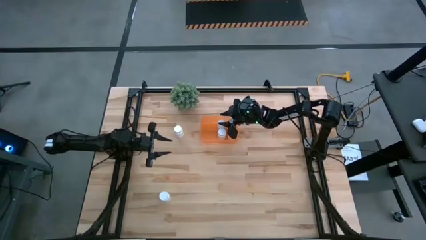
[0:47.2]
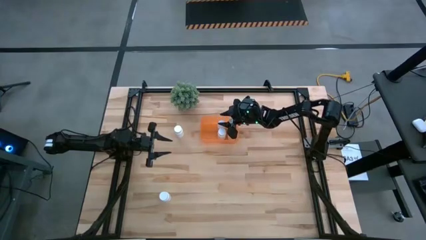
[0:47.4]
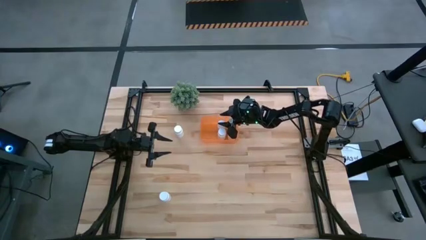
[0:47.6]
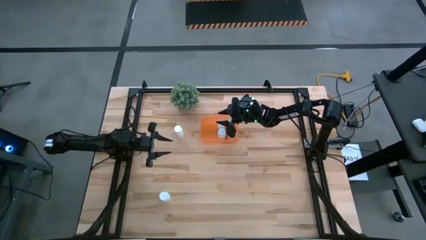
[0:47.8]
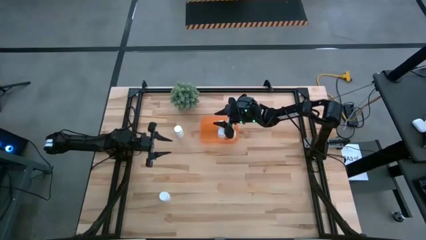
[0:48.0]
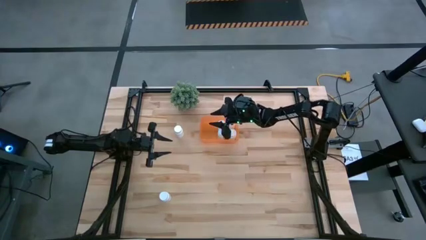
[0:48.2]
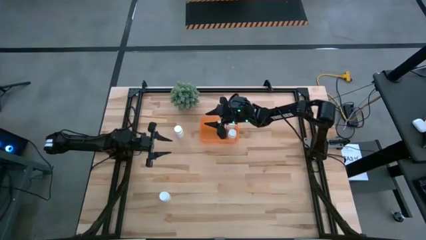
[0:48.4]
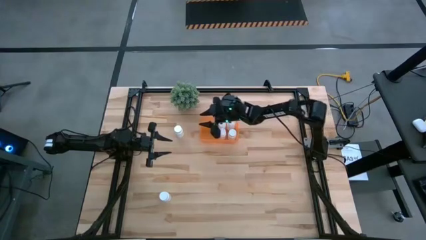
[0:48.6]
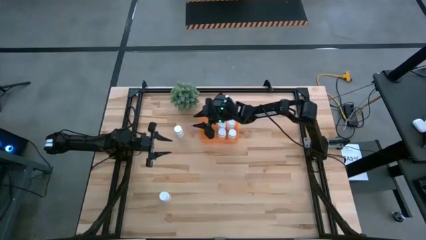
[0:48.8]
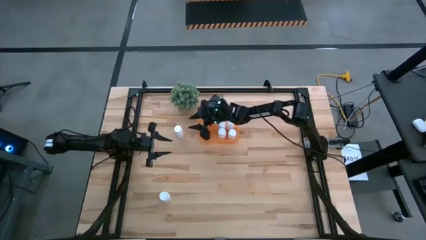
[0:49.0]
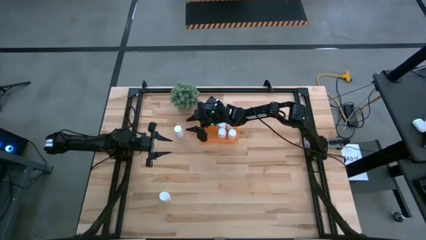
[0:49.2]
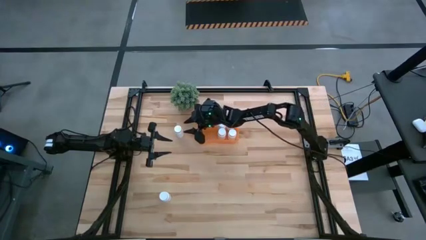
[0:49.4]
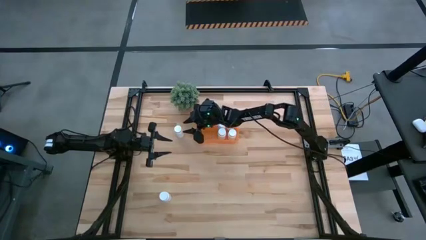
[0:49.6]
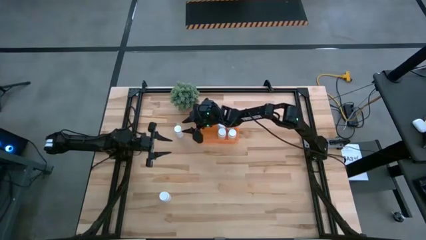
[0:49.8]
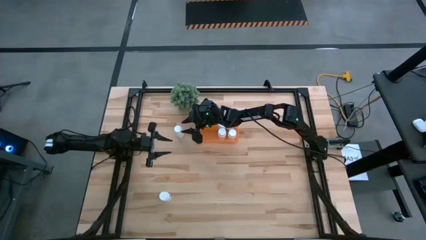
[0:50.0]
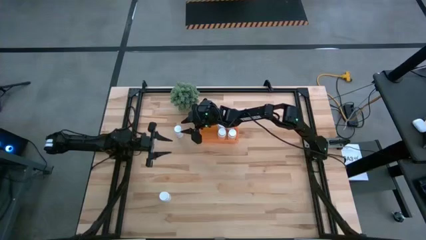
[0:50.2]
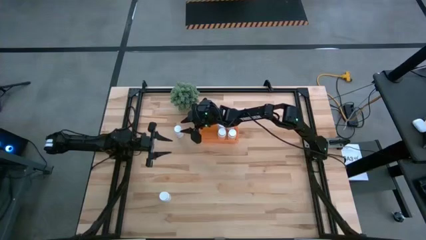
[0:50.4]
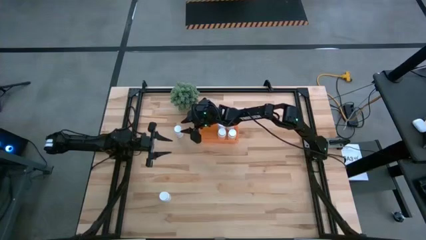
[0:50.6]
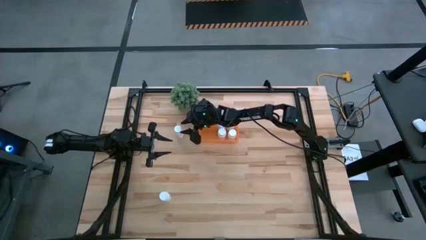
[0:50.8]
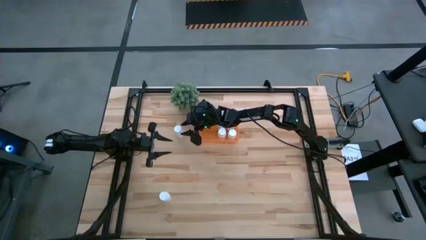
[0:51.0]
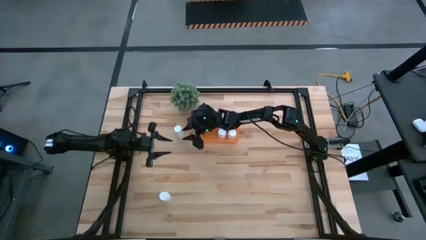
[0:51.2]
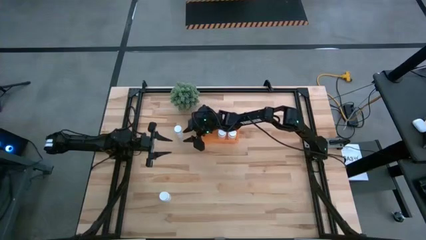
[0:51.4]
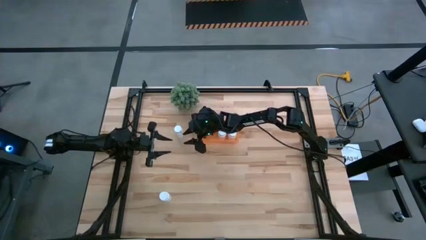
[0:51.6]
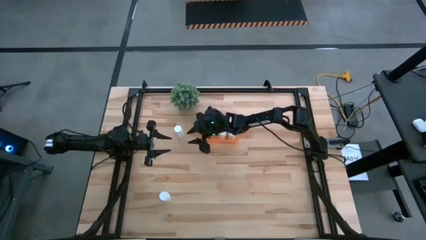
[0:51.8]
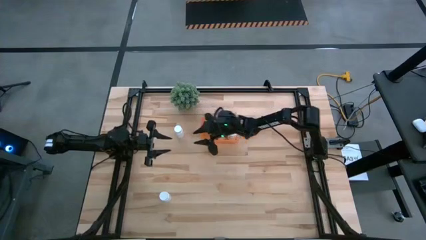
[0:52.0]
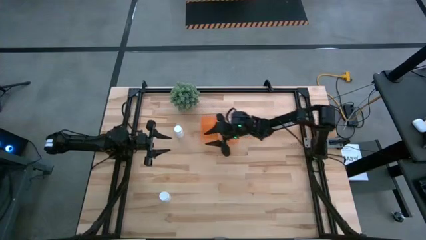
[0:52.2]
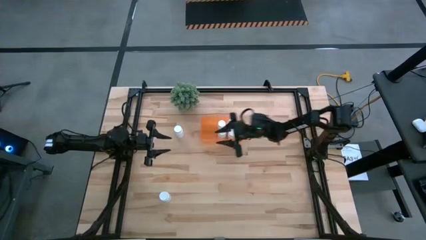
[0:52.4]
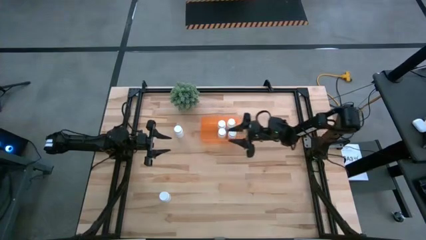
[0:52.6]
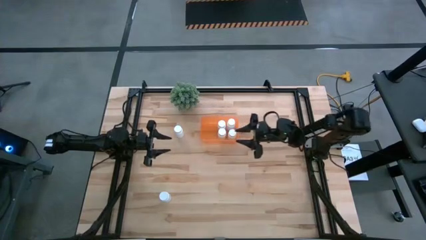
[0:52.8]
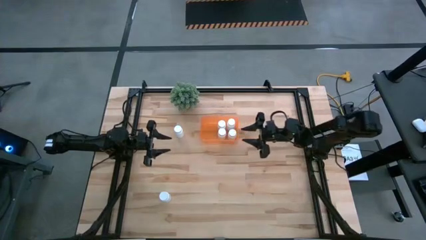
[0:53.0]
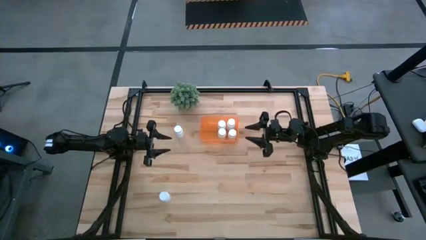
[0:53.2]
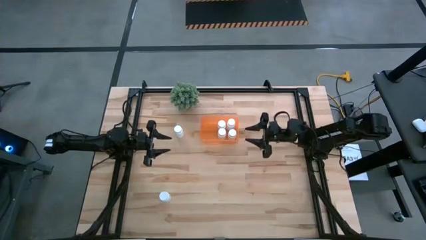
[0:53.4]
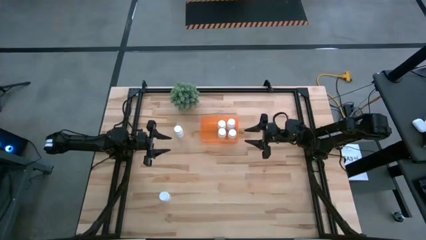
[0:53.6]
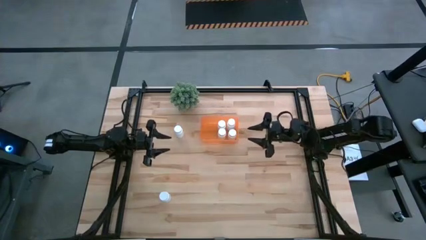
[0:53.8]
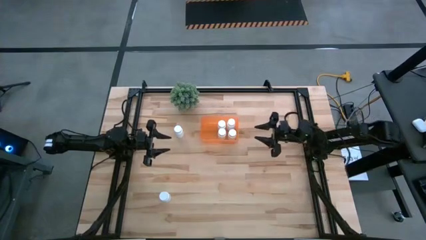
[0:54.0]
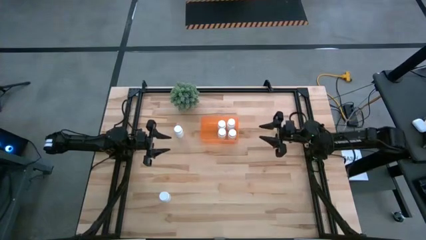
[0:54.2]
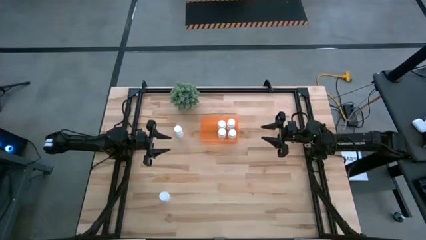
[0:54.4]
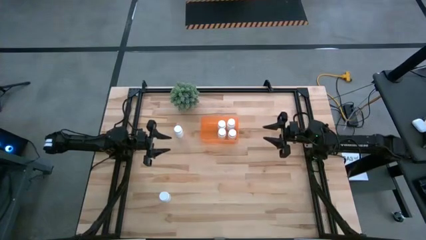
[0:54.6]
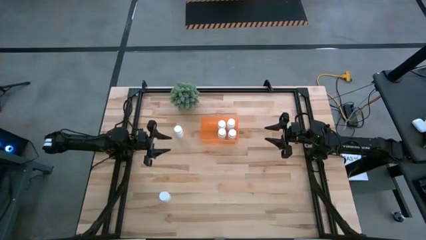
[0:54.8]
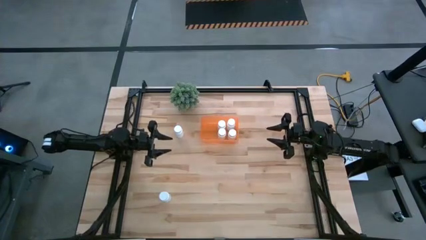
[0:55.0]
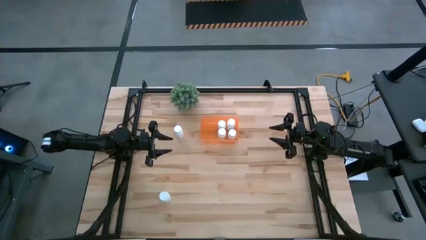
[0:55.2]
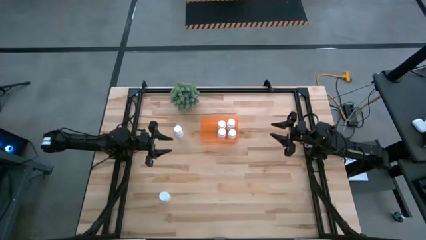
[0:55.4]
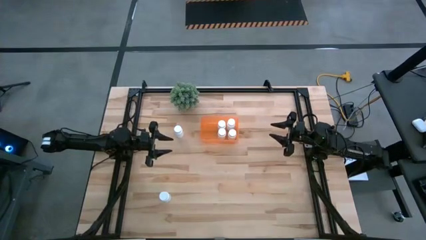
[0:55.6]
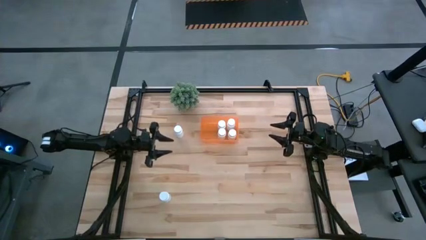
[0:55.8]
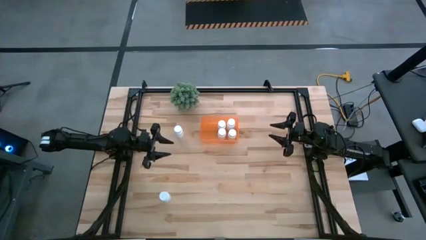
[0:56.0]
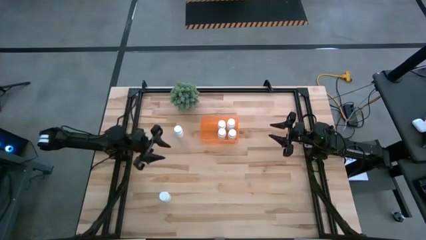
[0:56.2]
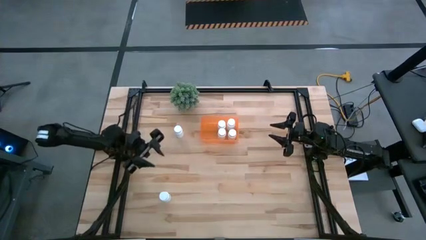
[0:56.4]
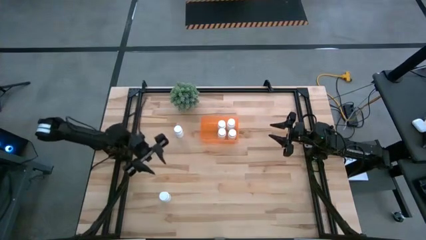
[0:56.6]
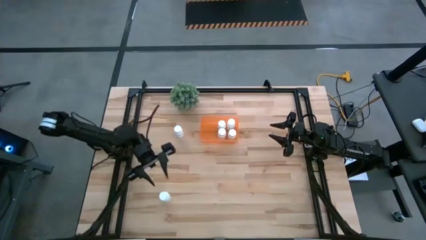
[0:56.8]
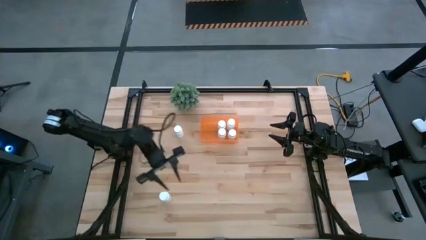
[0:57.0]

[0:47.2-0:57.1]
Task: Pick and place pill bottles into a basket
Put the white pill bottle into the orange bin
